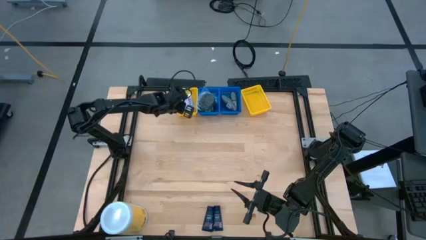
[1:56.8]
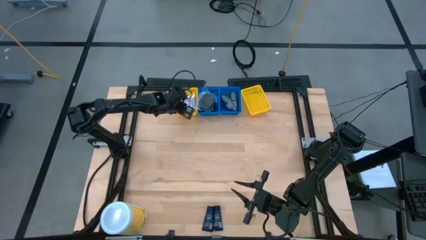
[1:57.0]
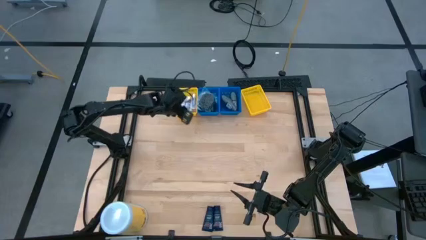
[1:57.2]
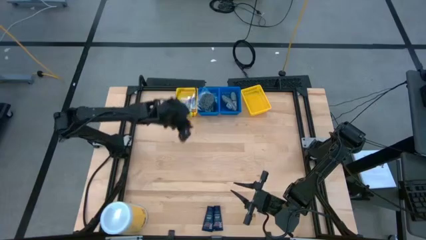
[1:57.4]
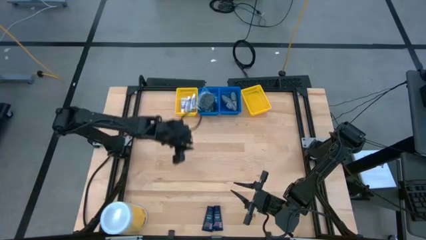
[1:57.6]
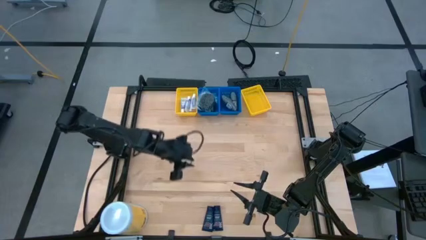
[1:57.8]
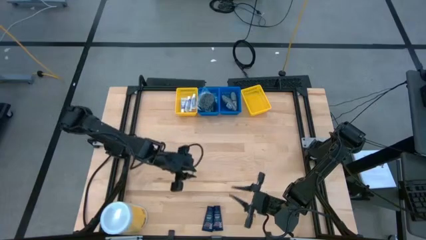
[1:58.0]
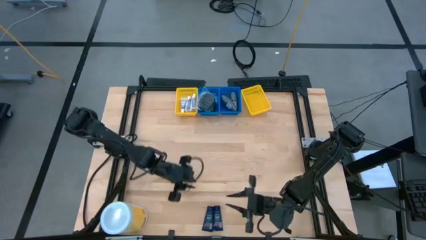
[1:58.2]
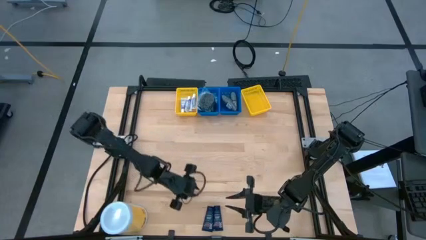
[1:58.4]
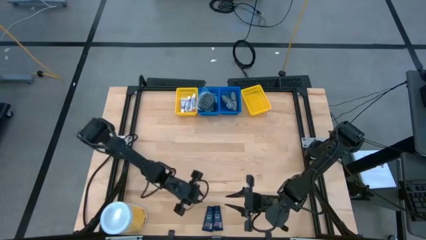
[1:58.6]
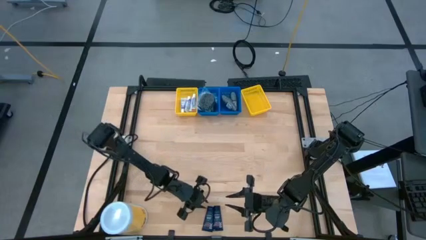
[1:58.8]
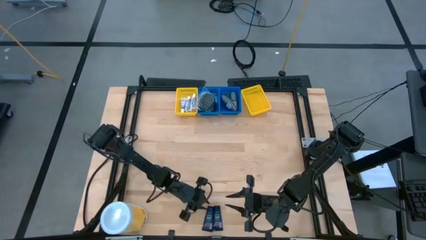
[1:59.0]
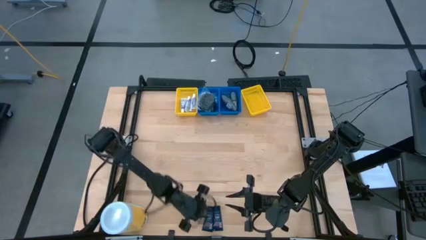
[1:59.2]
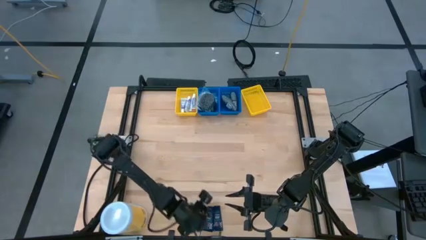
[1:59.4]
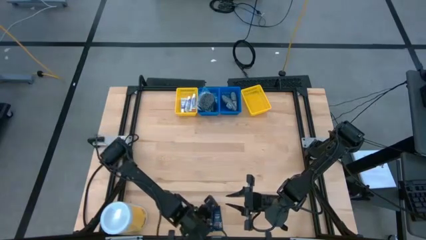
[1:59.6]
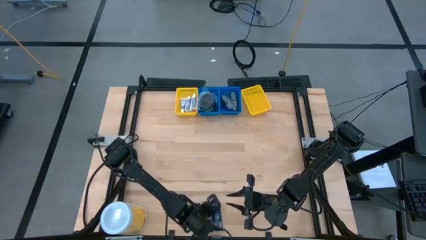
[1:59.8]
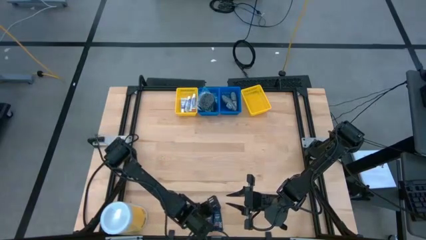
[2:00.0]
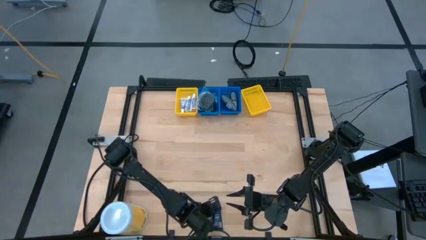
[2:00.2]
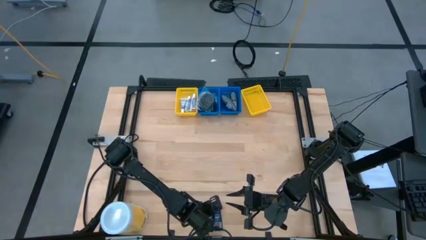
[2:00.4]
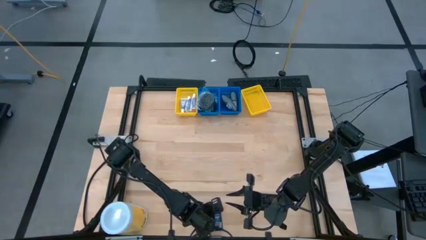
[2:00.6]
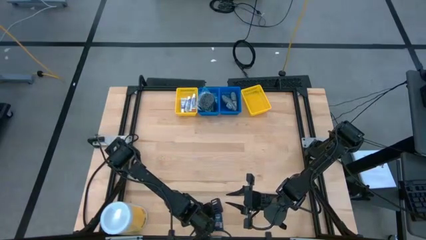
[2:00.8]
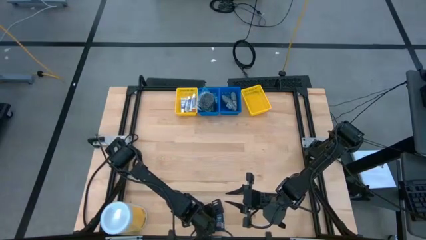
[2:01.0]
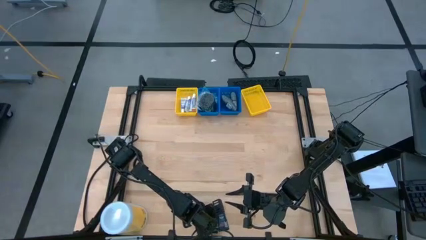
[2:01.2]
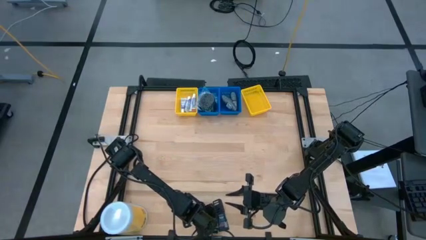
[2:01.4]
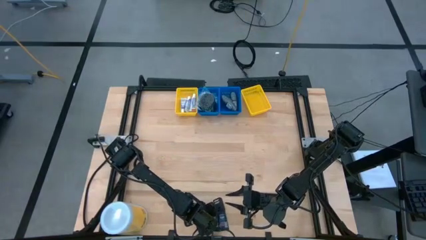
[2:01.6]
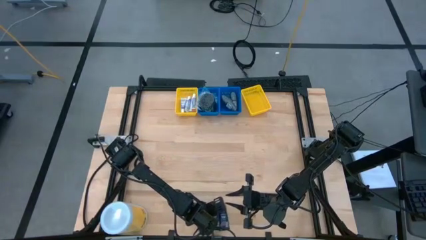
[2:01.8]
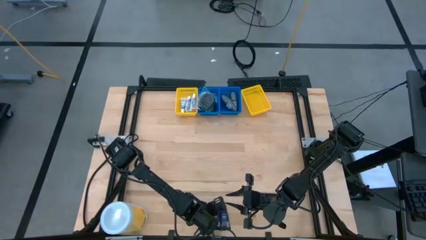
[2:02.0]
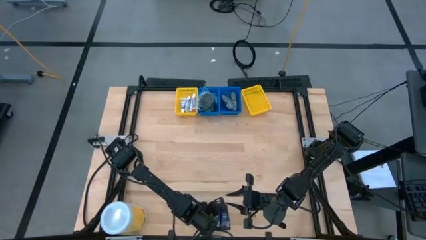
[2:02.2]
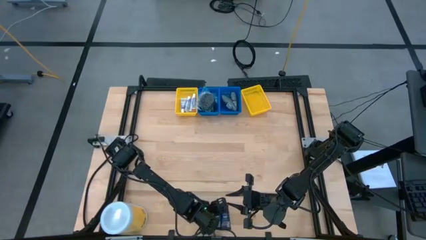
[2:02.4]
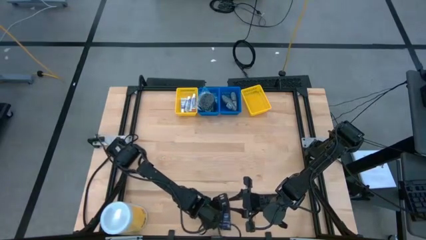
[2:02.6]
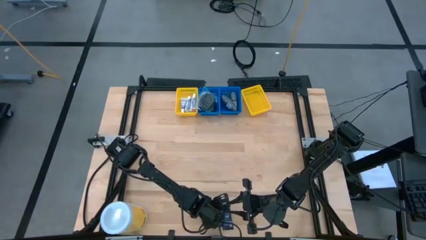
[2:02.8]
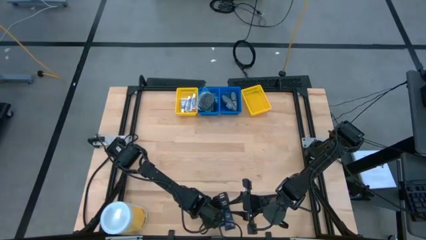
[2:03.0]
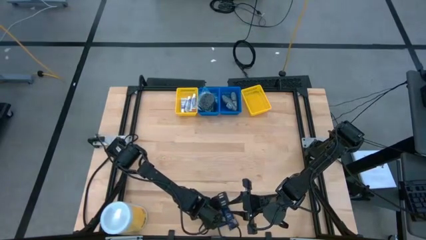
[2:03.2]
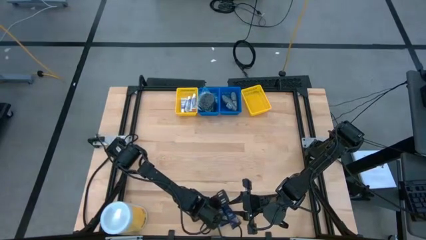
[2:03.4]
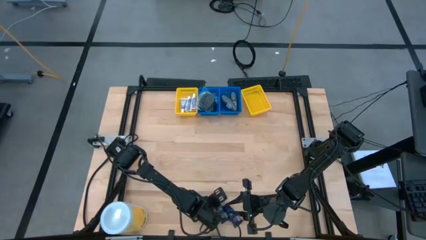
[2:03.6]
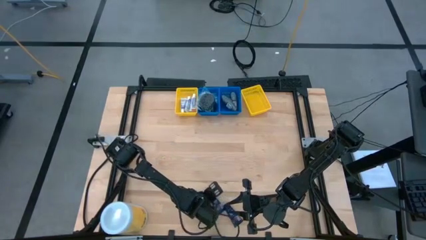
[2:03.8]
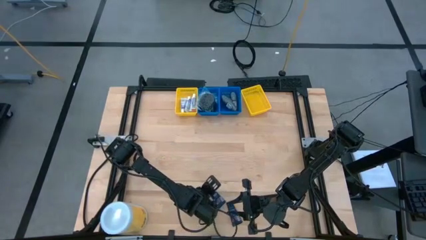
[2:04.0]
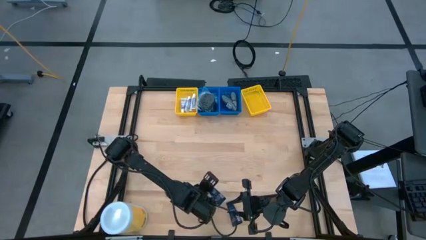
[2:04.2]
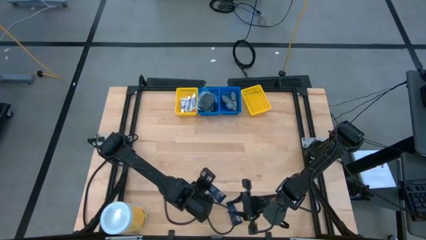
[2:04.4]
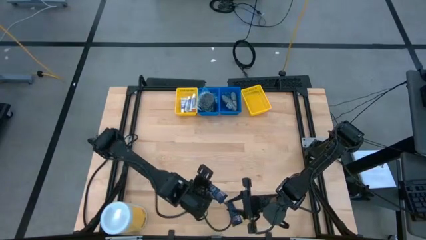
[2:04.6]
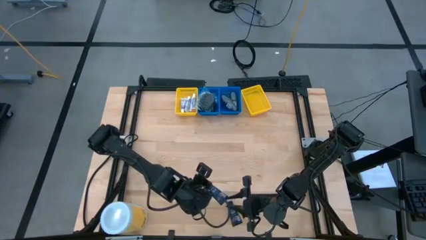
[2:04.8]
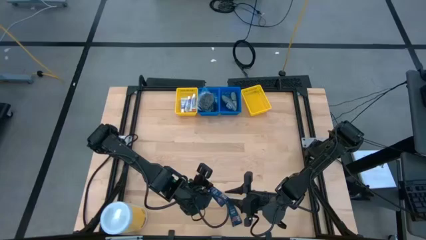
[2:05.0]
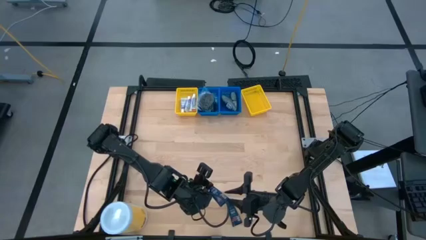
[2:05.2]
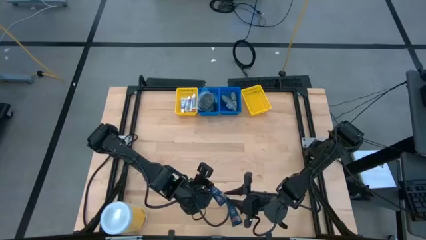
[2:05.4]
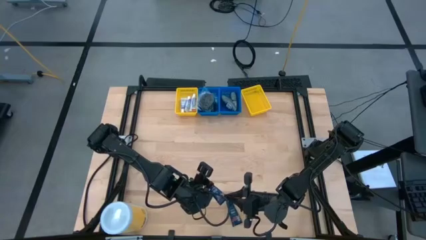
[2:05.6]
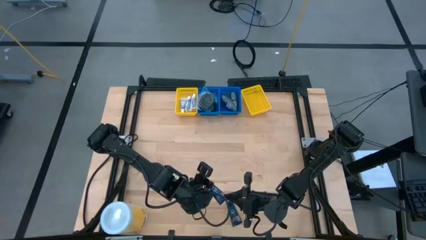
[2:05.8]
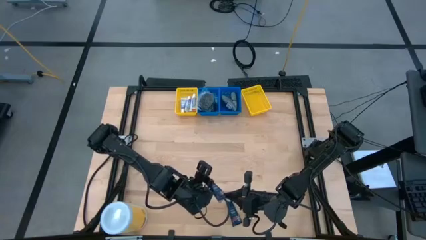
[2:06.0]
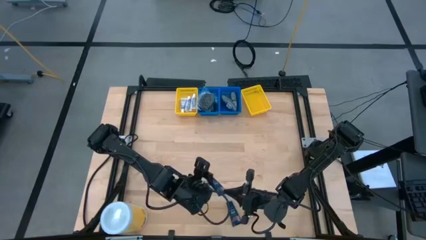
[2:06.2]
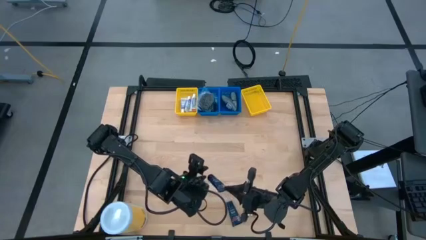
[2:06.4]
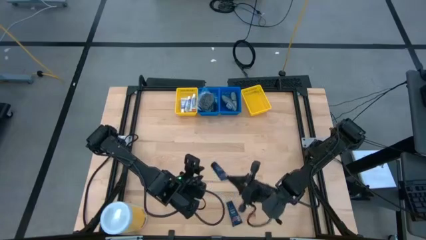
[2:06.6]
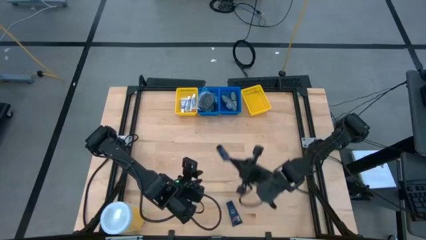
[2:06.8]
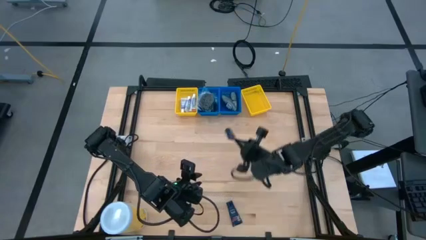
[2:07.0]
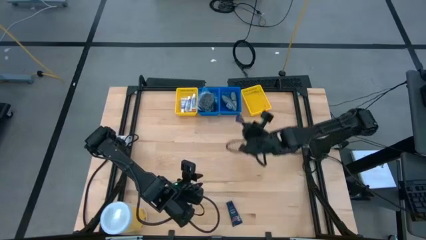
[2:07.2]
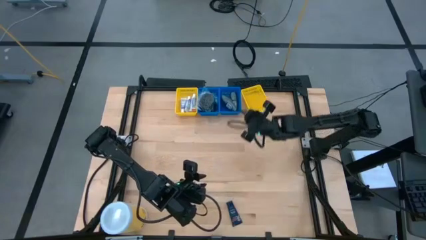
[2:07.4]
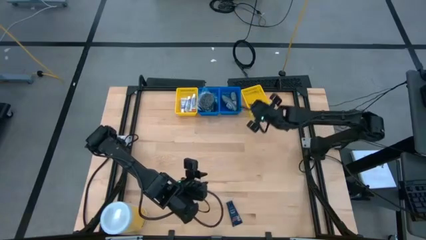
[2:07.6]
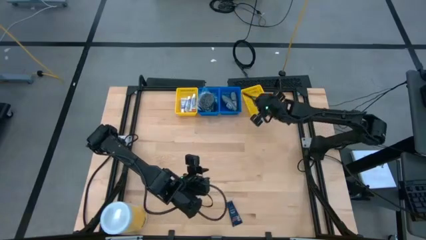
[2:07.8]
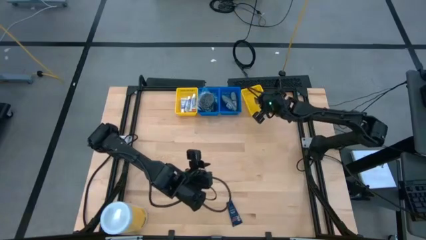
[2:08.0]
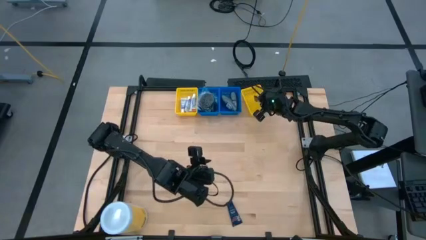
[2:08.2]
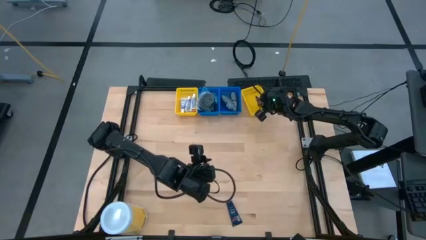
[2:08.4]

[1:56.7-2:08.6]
Task: Pick & Place Travel size toiletries
Put the left shave cream into the right yellow bin
